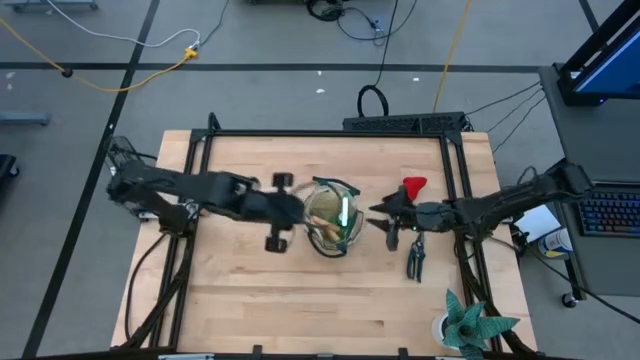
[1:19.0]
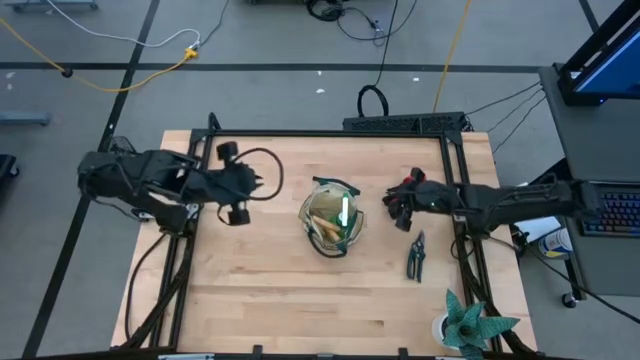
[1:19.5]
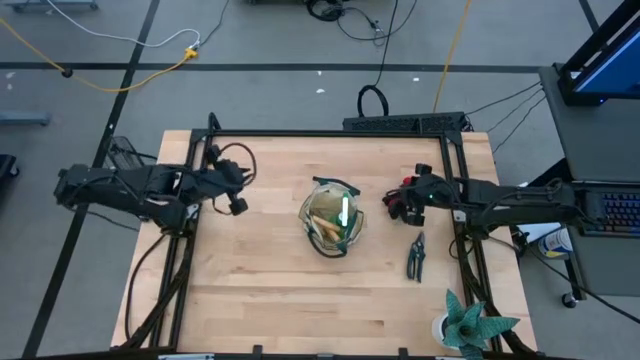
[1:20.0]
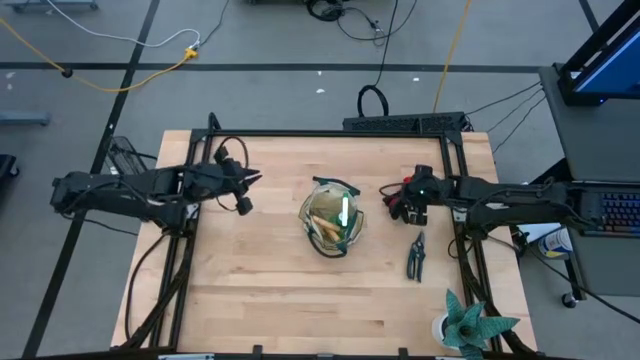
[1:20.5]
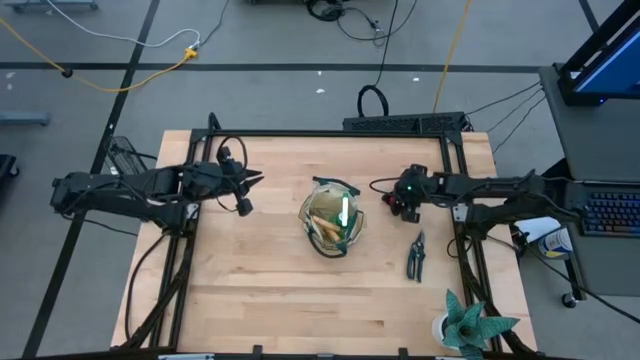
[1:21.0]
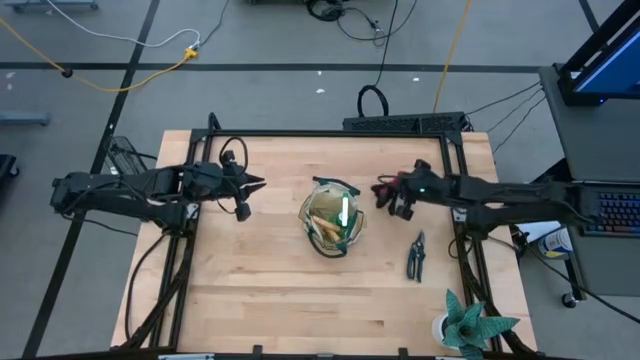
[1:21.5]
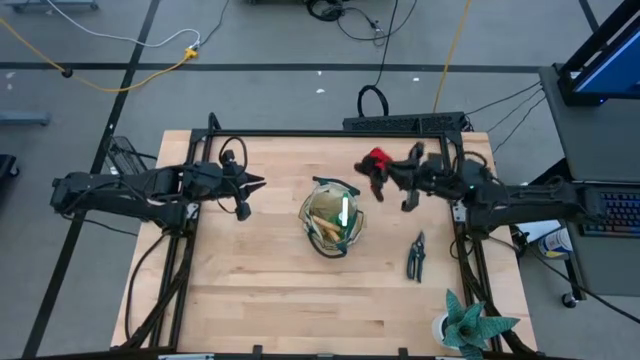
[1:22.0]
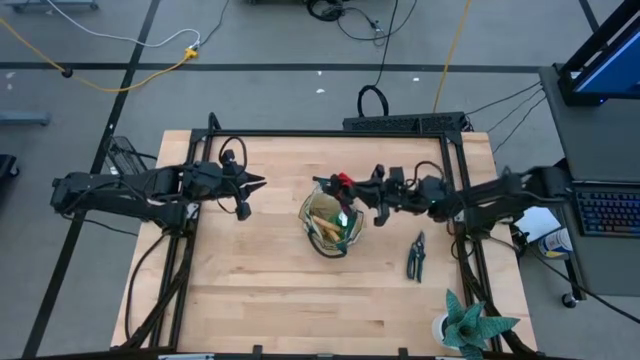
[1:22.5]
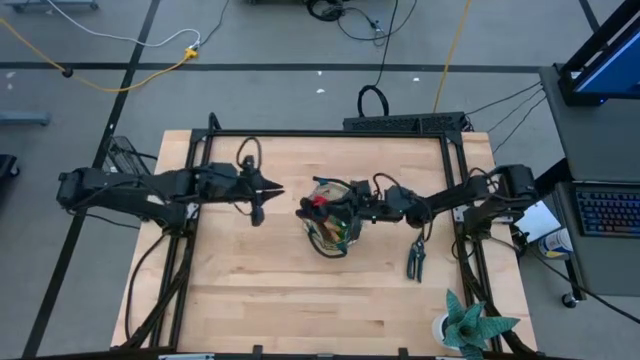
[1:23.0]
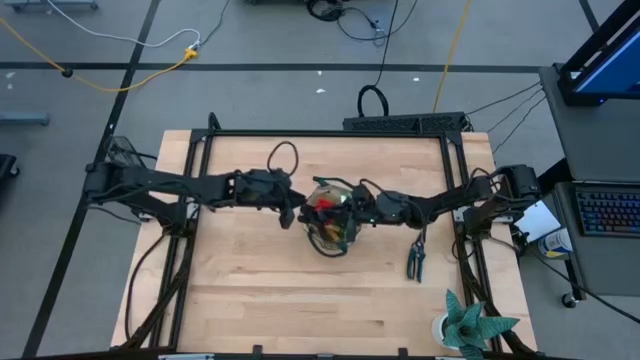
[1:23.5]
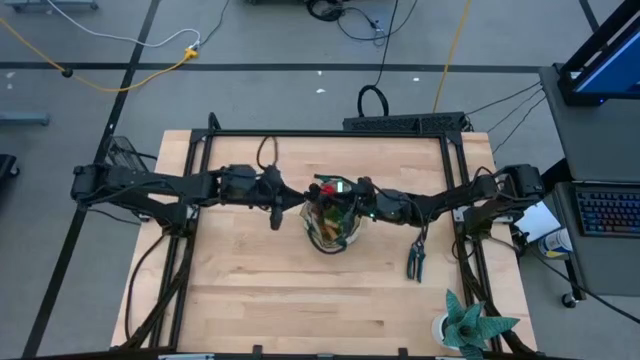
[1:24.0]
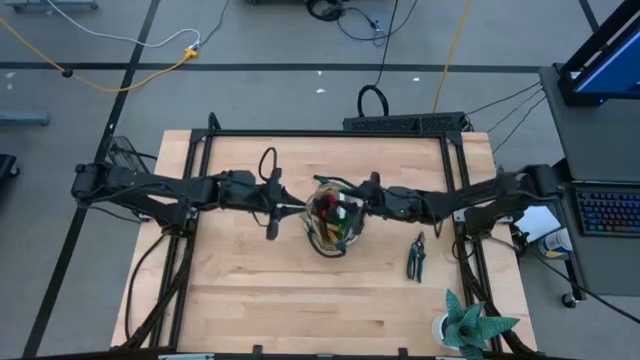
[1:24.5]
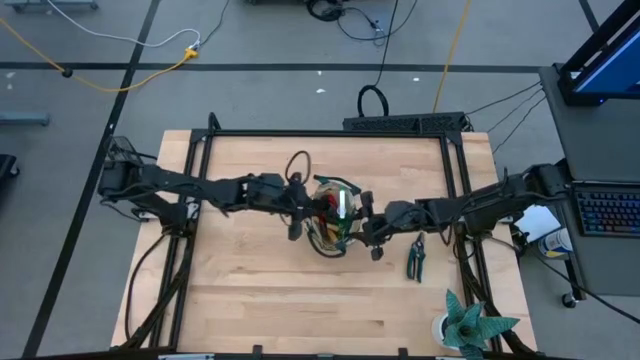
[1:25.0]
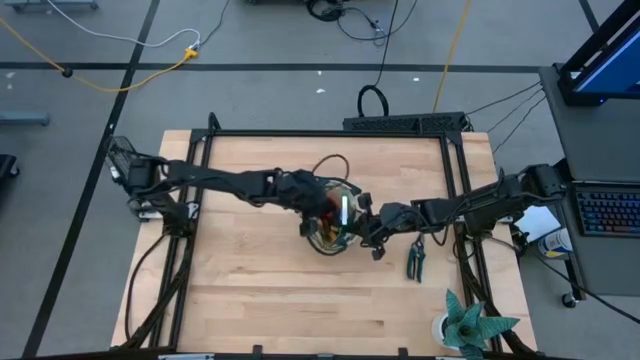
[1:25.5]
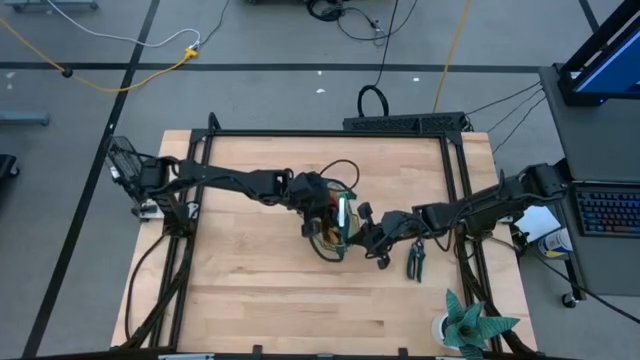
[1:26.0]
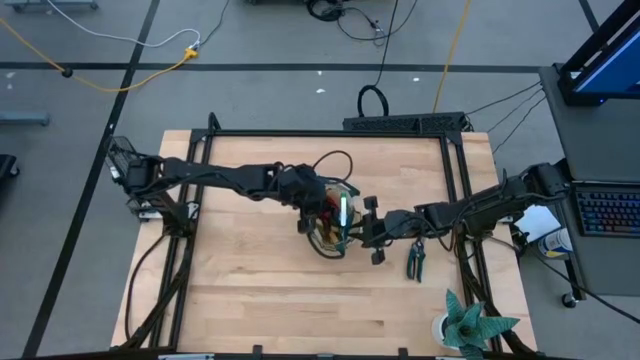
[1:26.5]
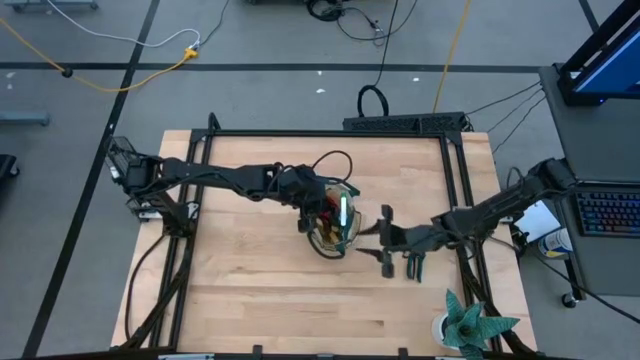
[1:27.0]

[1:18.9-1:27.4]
Task: Pick & Place Garden tools in Gardening bag
Put the red gloves into the brown gardening bag

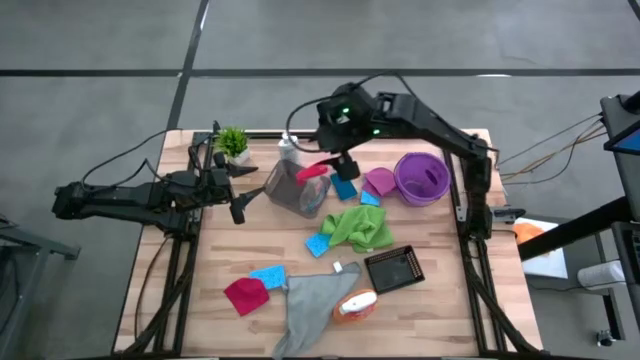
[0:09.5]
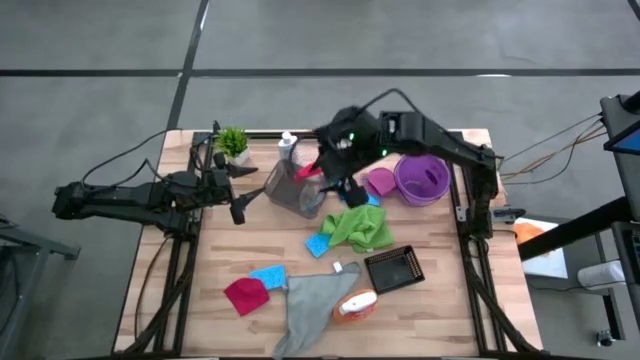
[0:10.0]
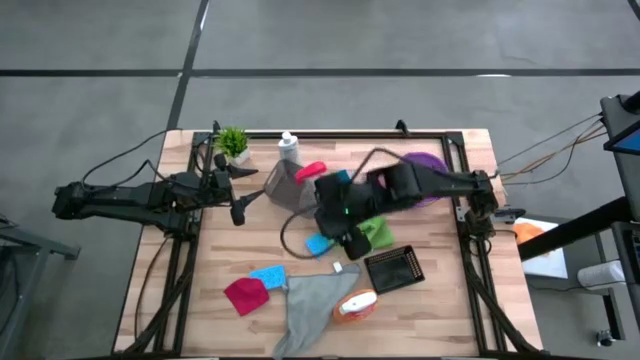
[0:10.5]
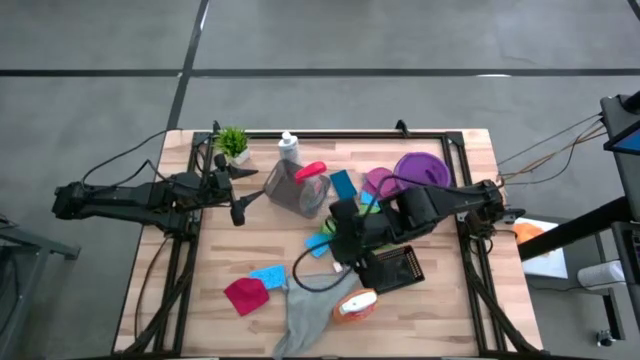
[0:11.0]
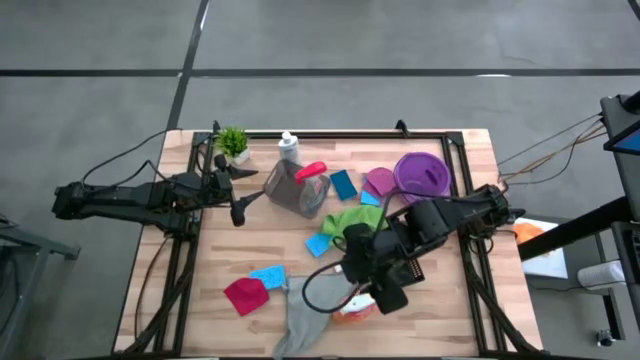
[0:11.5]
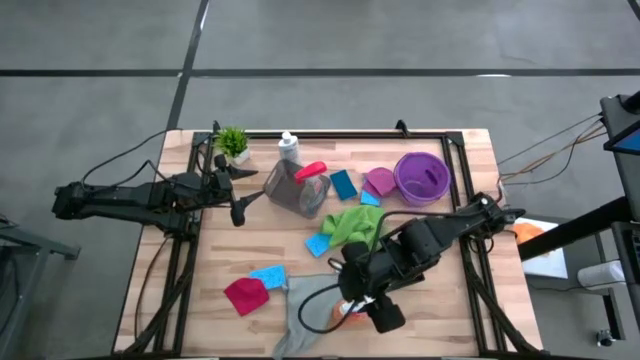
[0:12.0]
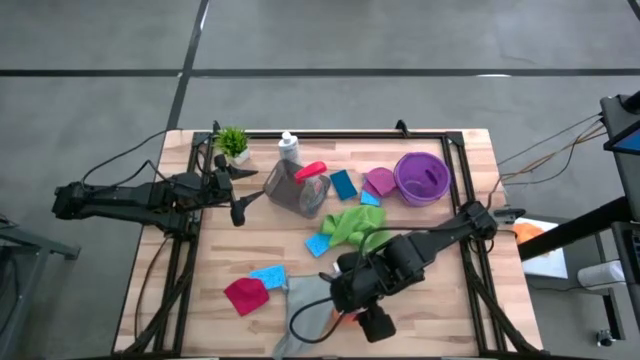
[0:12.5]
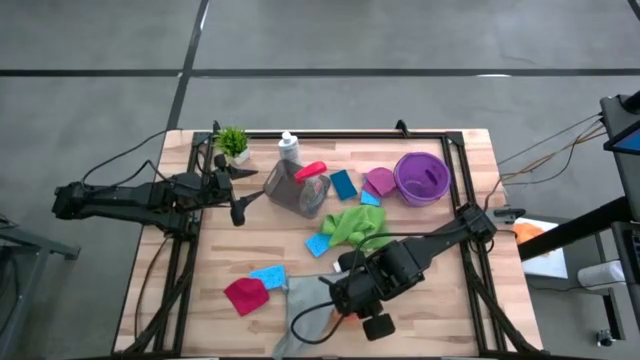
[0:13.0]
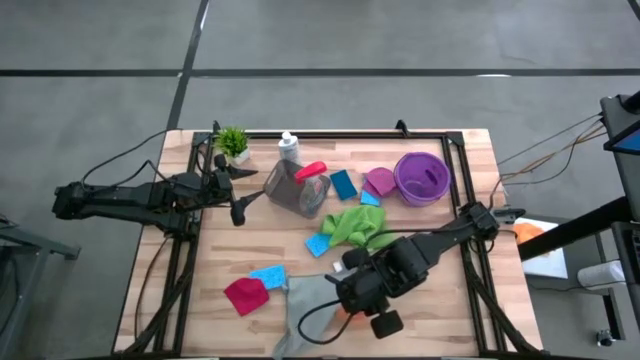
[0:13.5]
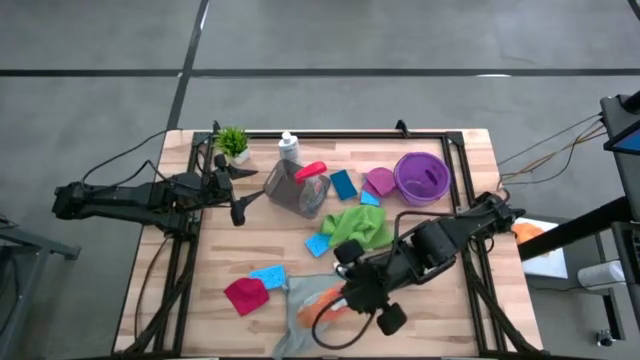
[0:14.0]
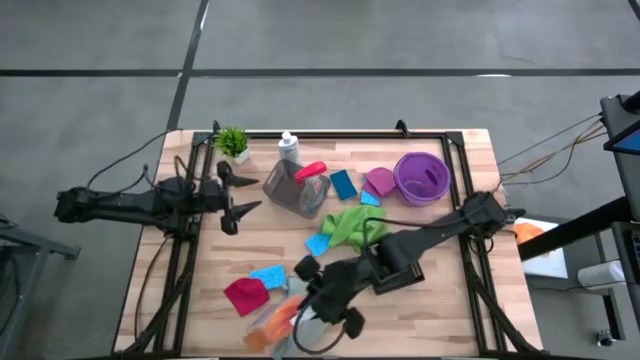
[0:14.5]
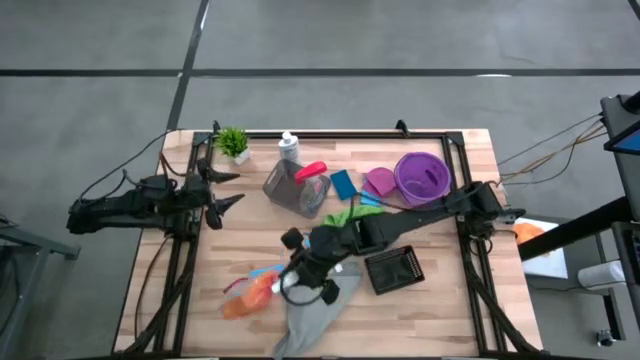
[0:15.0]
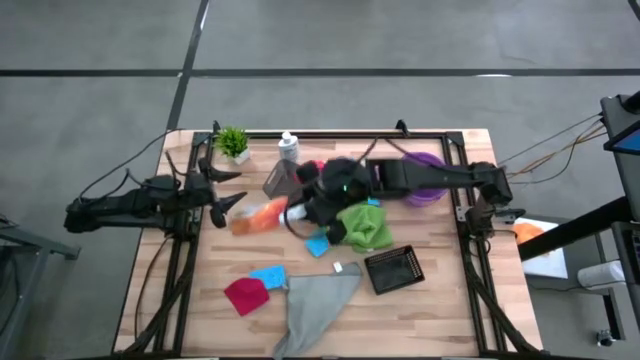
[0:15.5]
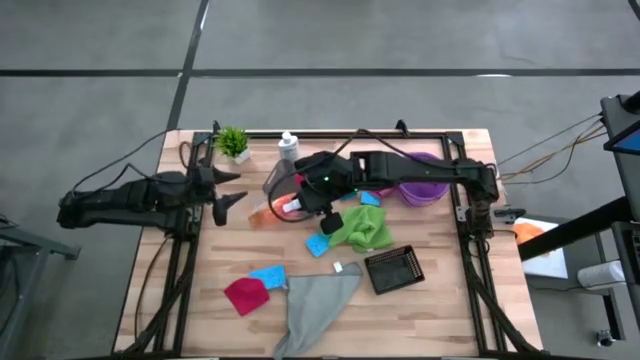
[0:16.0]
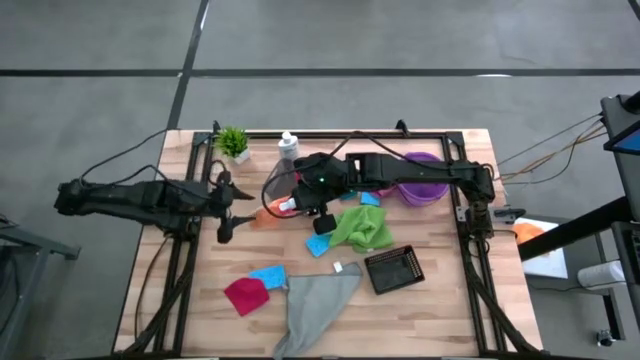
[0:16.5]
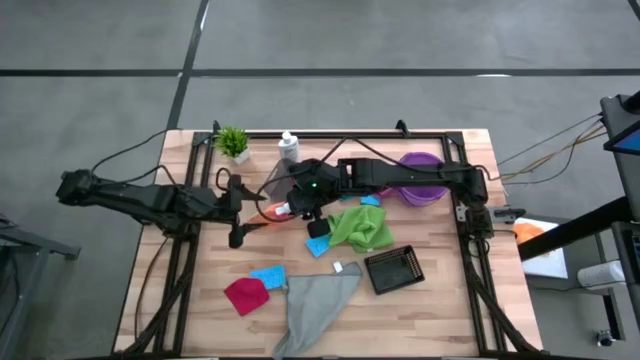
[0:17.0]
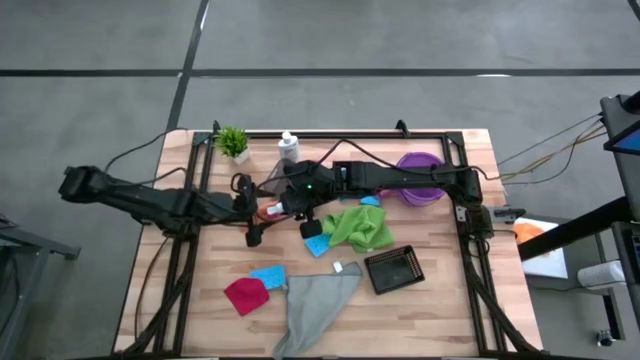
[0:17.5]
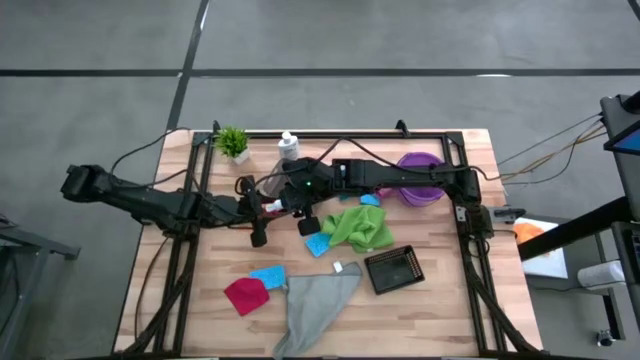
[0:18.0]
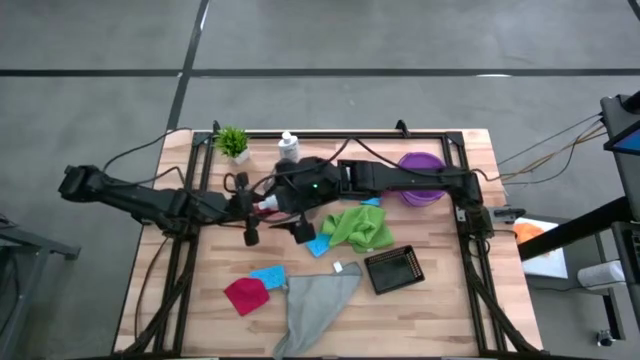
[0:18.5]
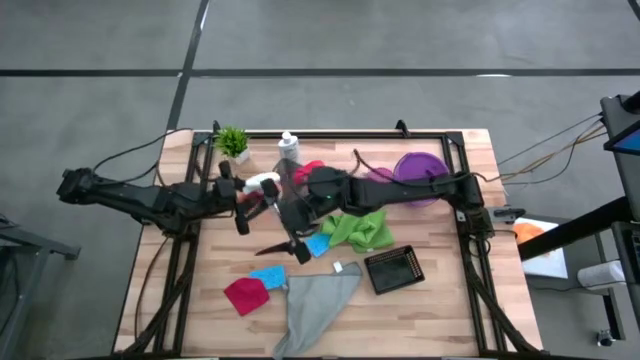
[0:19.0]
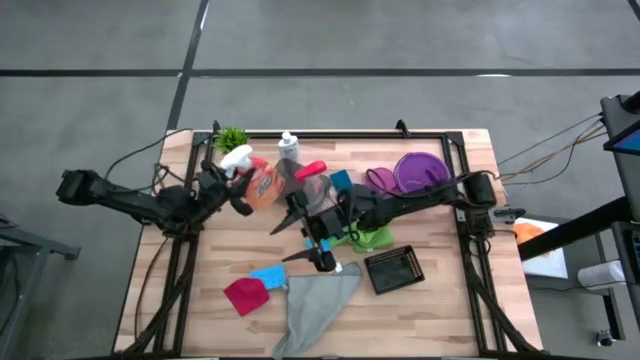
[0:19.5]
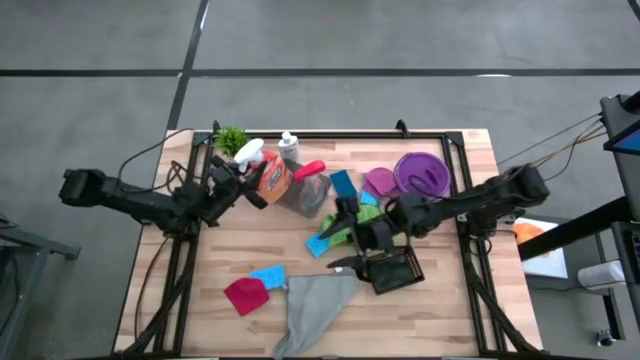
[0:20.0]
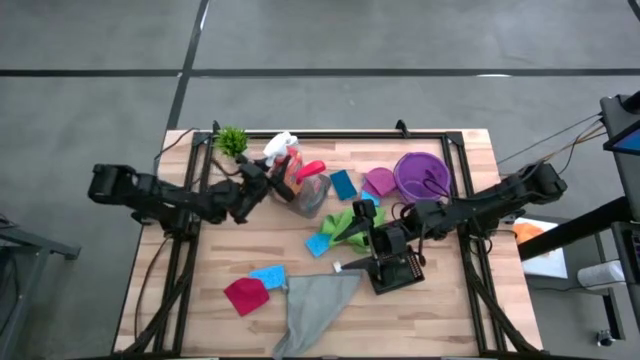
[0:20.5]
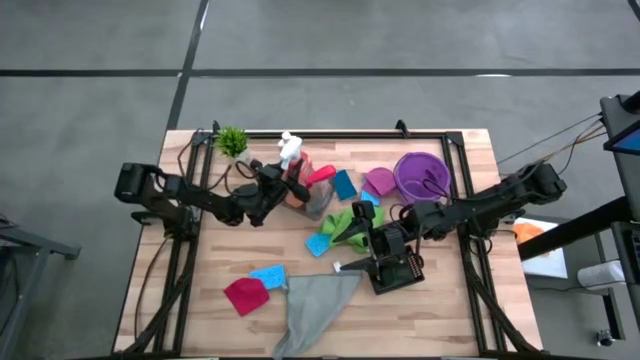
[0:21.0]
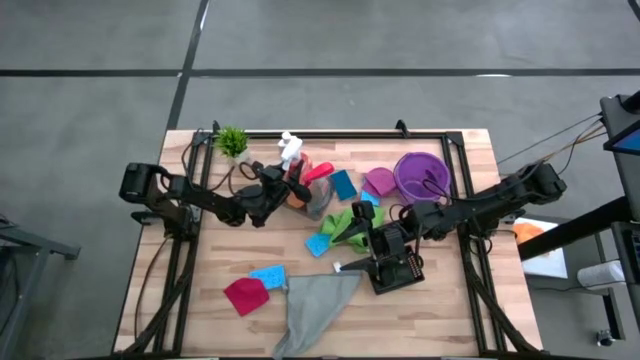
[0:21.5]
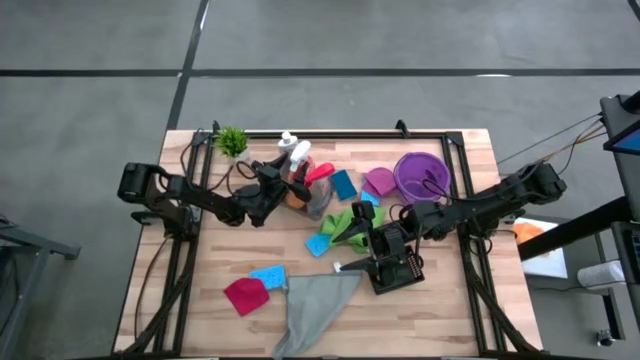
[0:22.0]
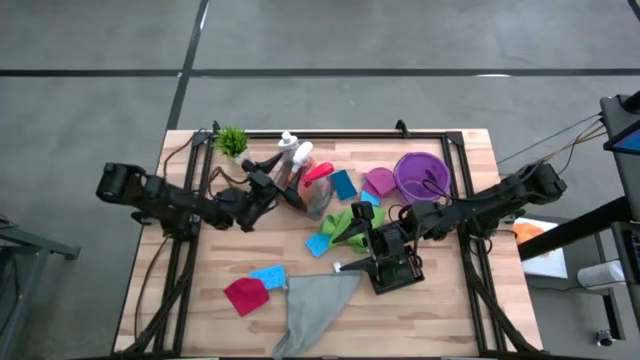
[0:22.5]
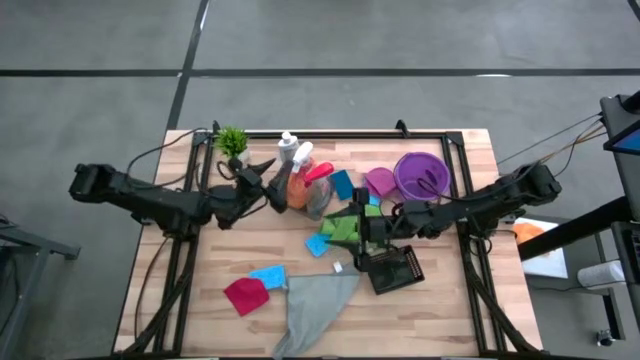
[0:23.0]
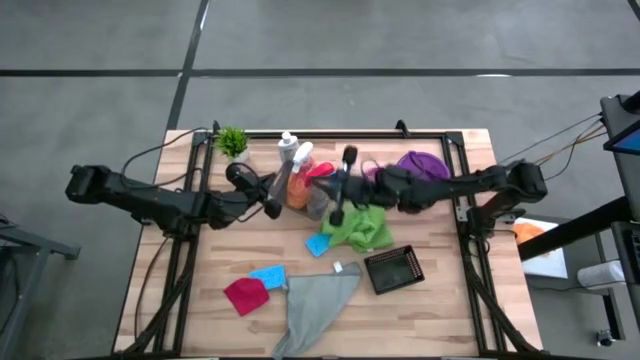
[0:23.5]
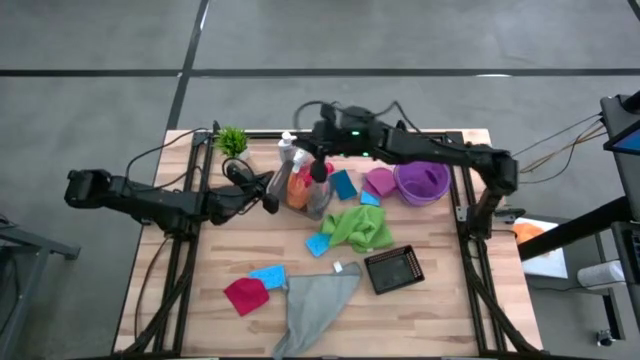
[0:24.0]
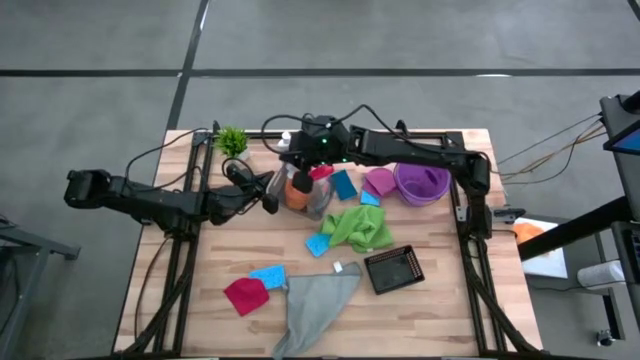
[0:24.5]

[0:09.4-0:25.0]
Task: Pick & Place Kitchen Items
Put the orange spray bottle into the black bin
